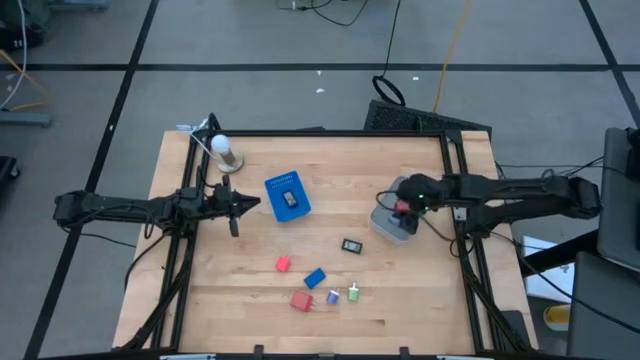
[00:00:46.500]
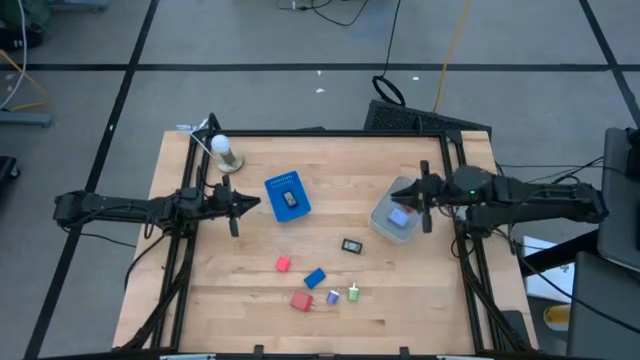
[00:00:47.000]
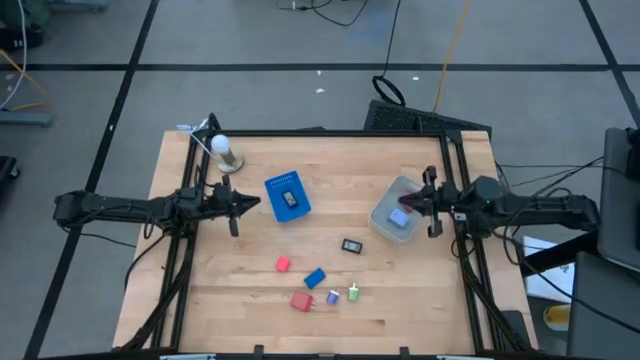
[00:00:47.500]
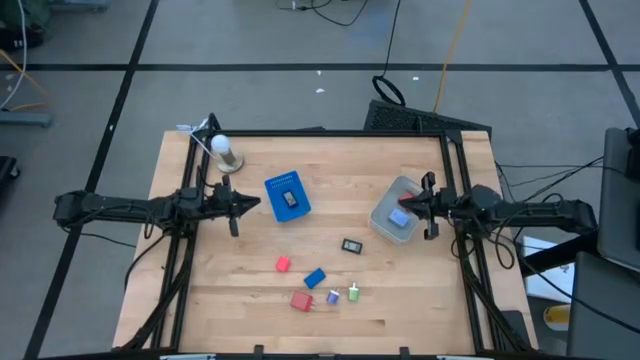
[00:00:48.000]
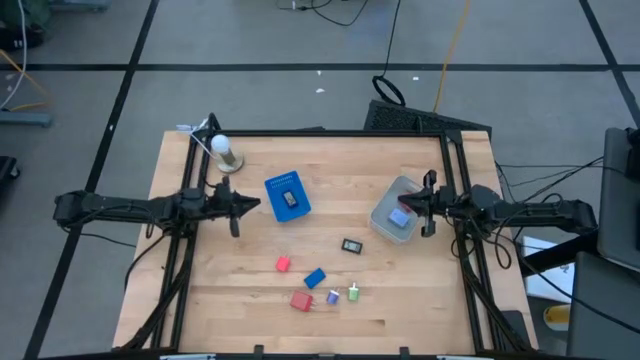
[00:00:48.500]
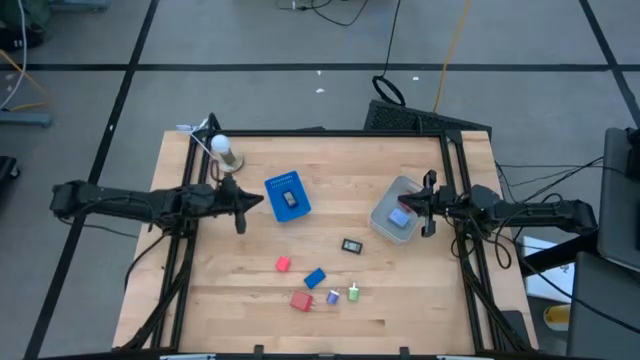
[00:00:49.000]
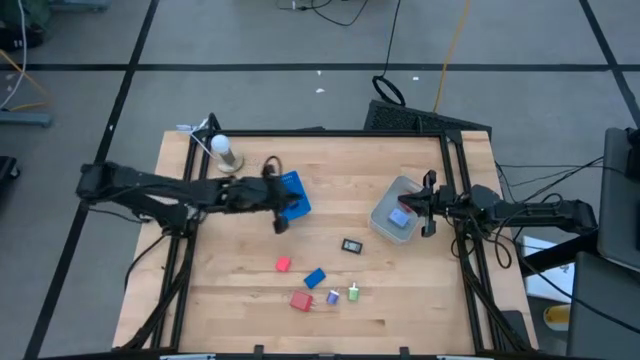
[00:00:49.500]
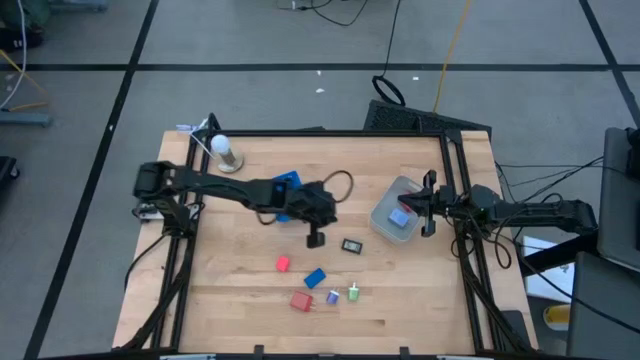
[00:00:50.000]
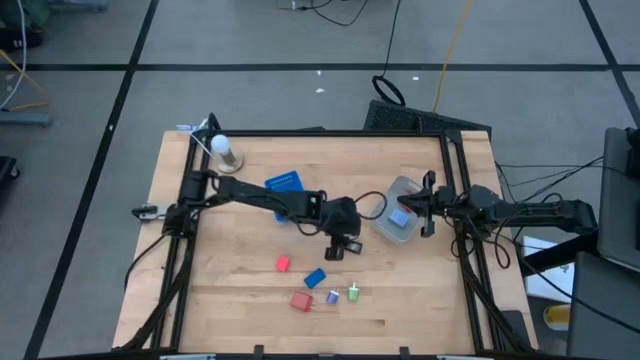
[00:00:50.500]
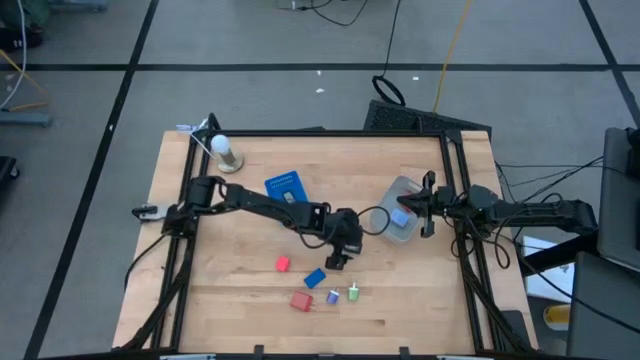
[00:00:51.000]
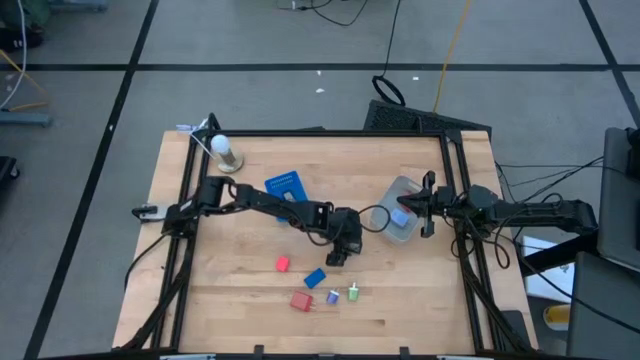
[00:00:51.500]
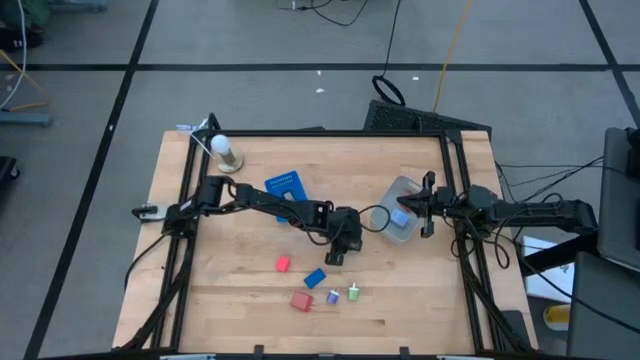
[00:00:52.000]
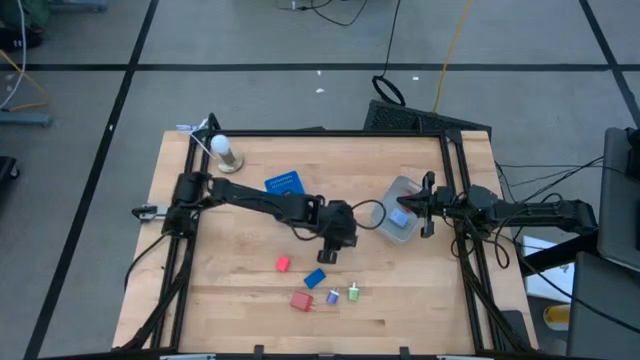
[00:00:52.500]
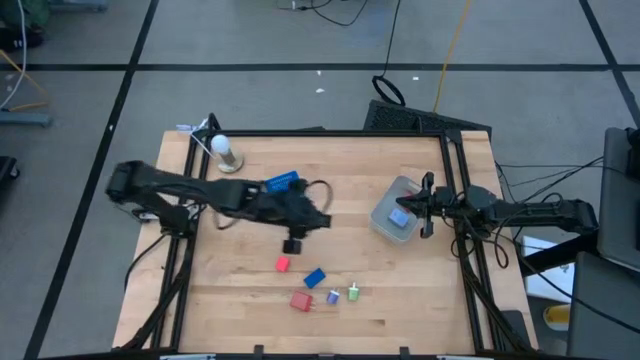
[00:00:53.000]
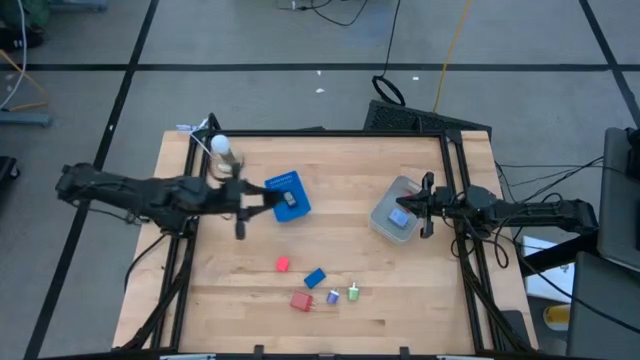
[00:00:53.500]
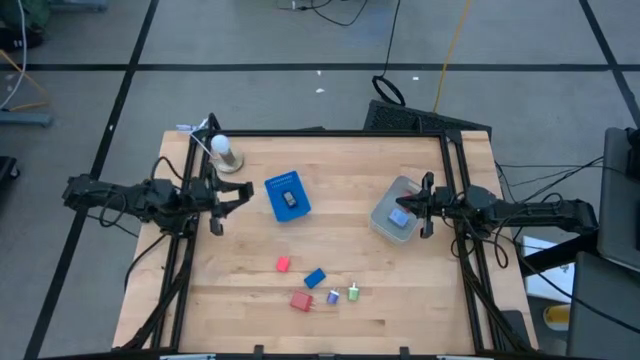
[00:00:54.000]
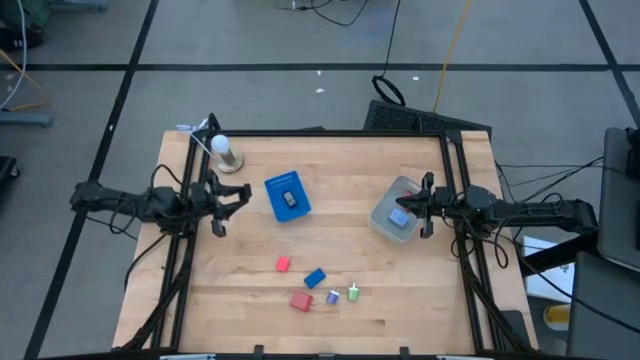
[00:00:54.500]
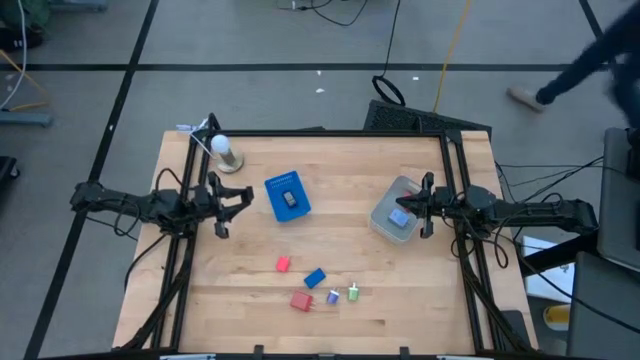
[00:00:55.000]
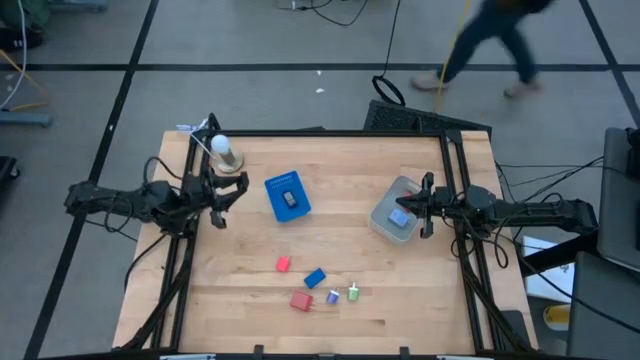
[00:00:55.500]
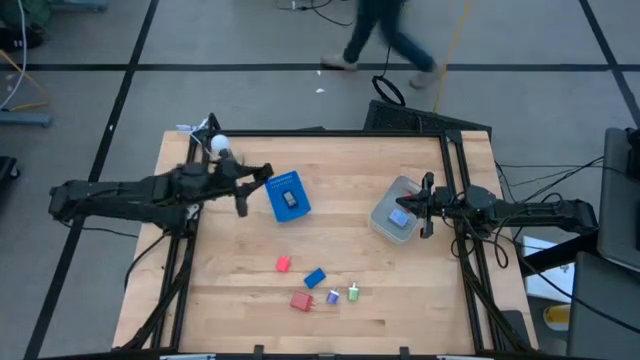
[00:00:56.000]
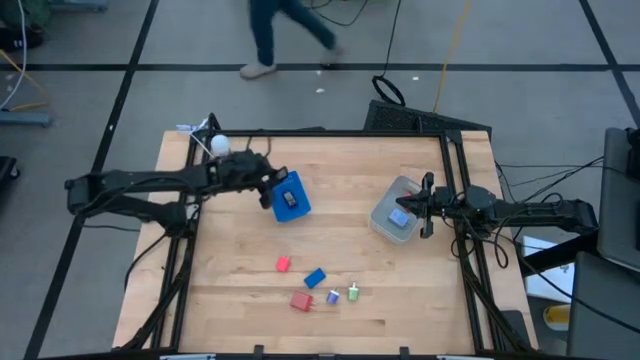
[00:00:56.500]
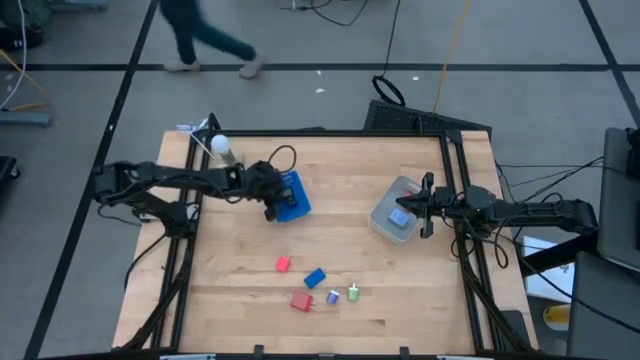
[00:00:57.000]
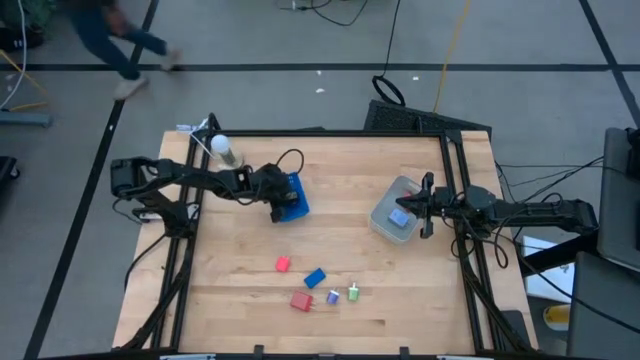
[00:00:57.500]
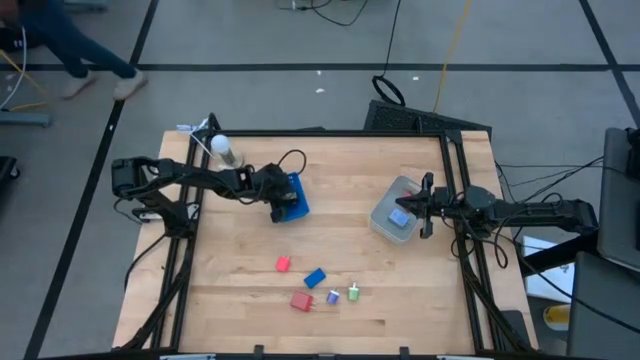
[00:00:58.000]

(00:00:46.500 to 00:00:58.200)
Task: Pick & Place Office items
Put the black digital clock into the blue bin

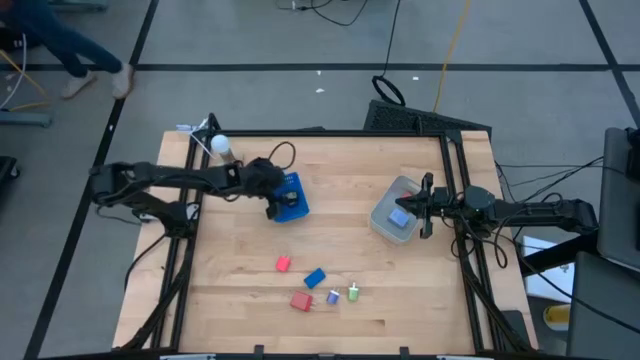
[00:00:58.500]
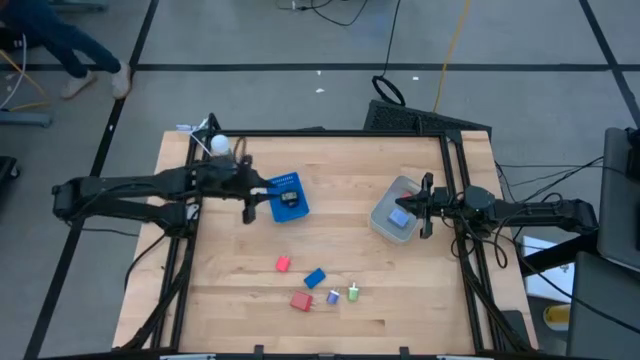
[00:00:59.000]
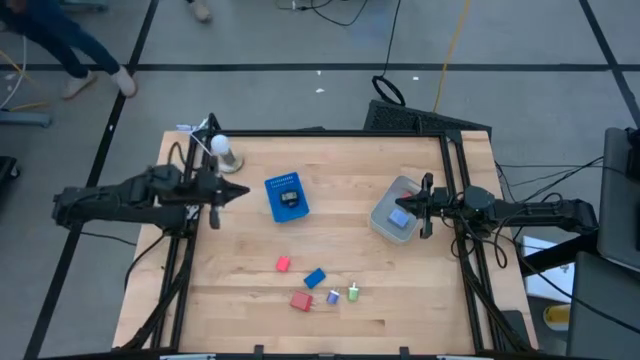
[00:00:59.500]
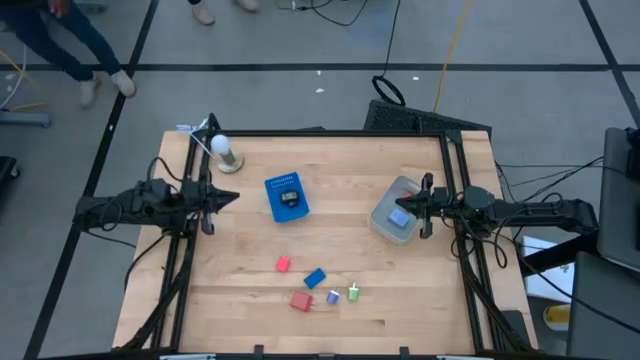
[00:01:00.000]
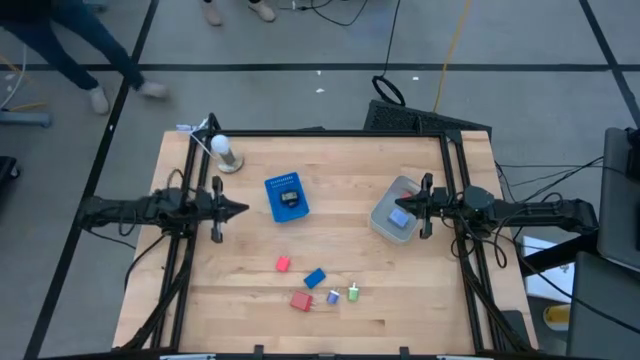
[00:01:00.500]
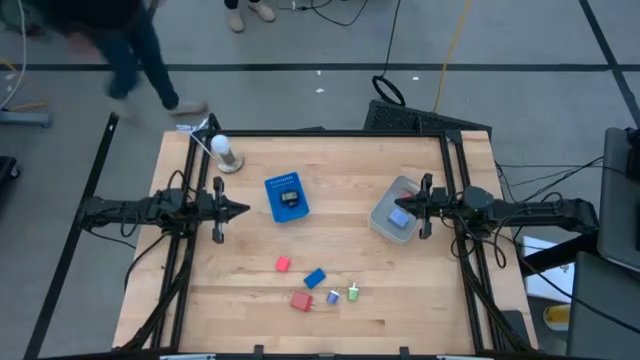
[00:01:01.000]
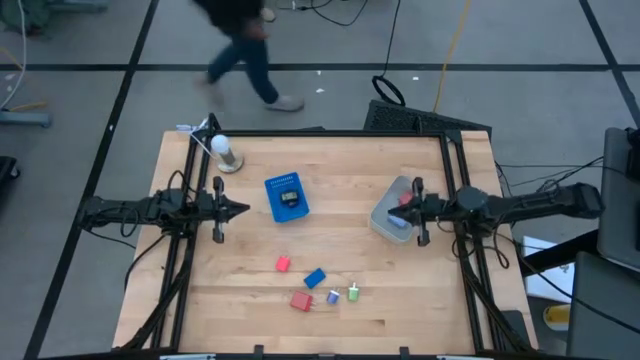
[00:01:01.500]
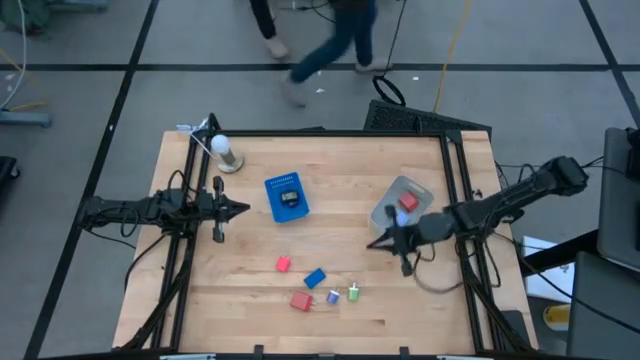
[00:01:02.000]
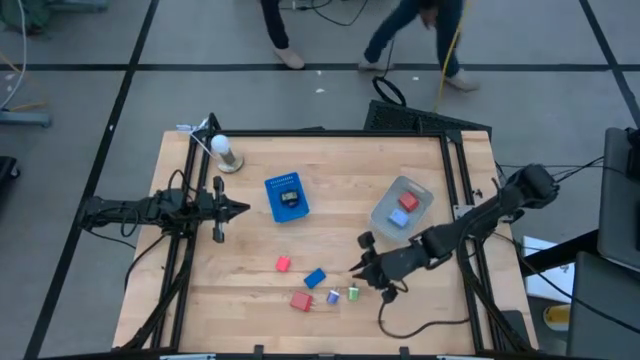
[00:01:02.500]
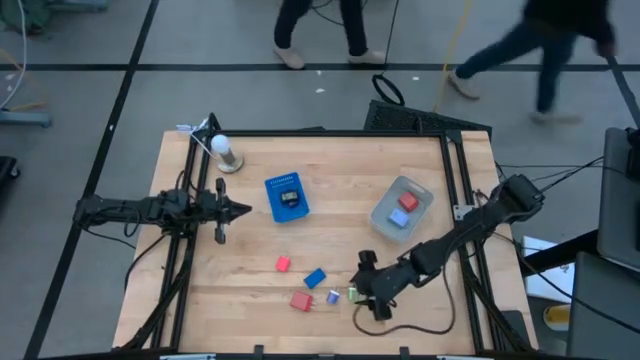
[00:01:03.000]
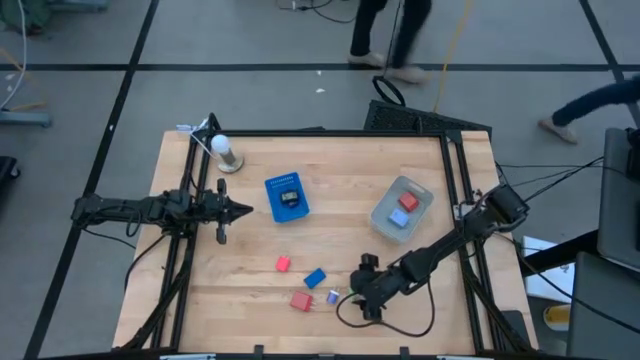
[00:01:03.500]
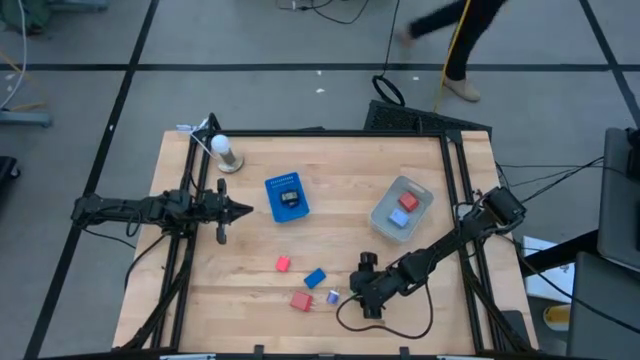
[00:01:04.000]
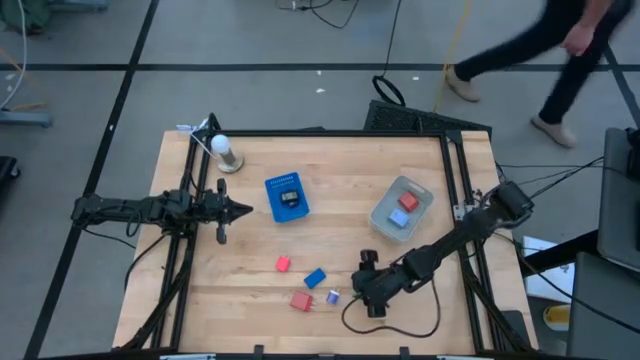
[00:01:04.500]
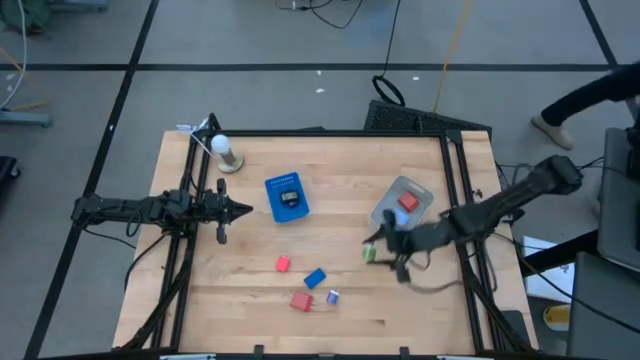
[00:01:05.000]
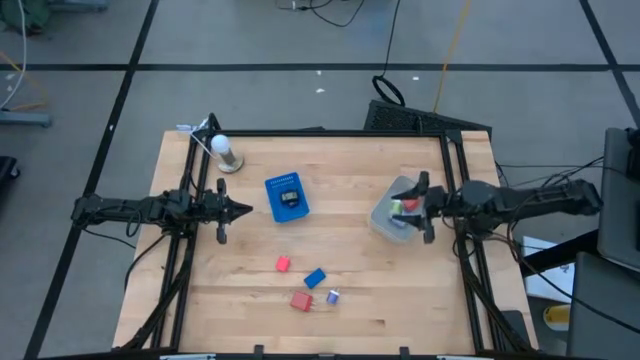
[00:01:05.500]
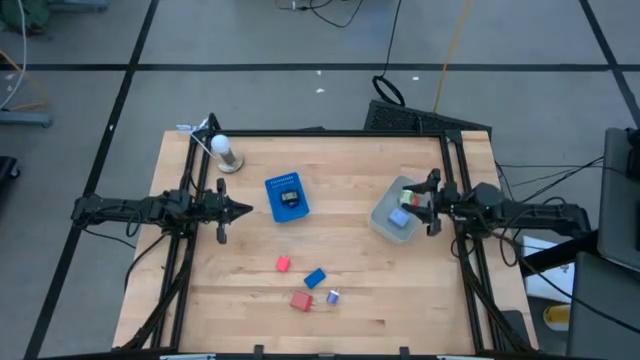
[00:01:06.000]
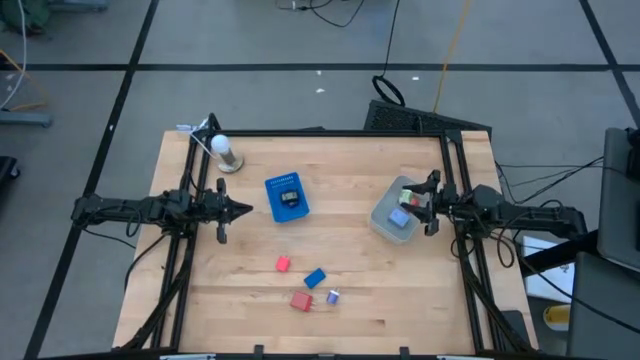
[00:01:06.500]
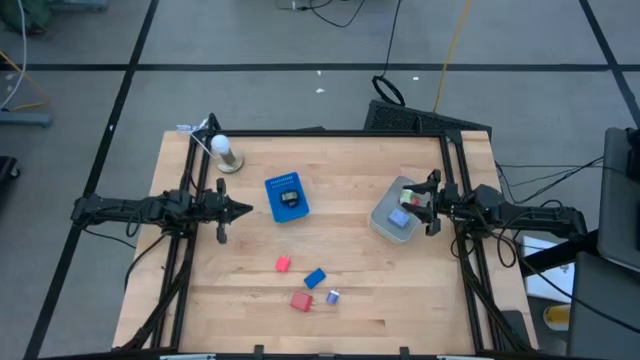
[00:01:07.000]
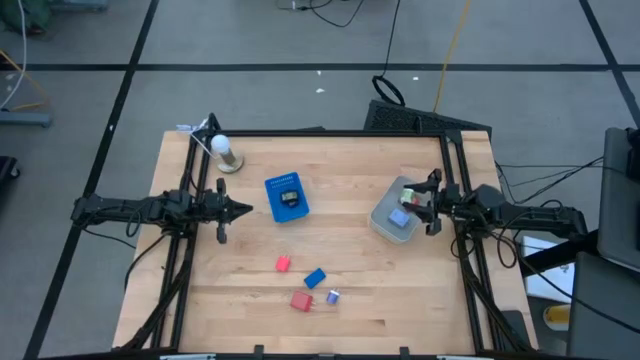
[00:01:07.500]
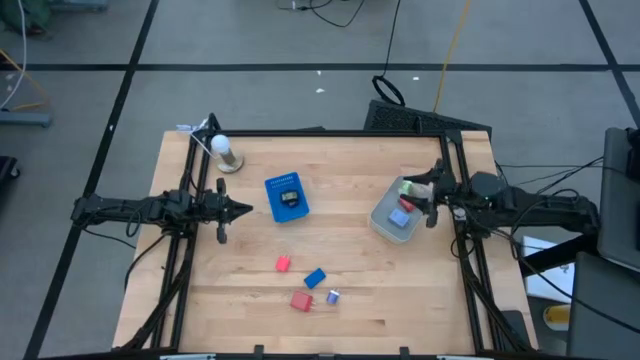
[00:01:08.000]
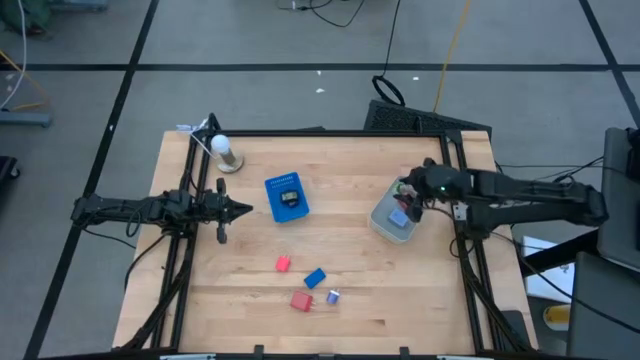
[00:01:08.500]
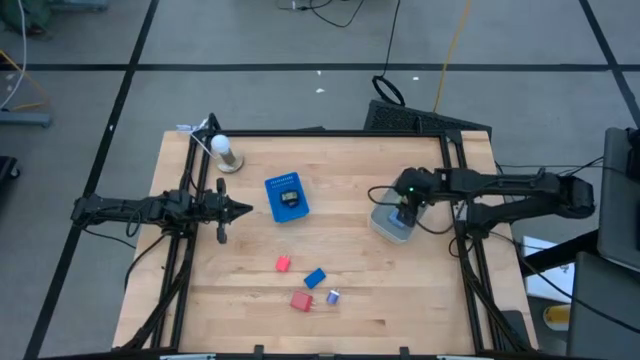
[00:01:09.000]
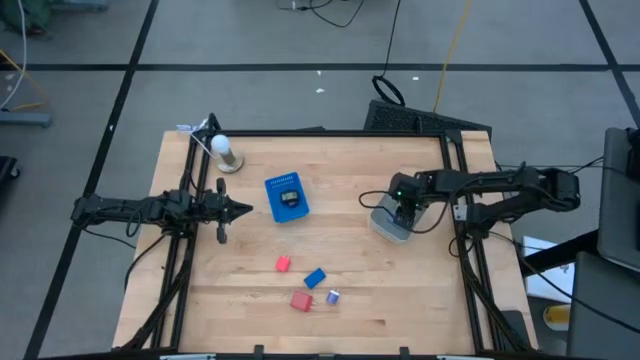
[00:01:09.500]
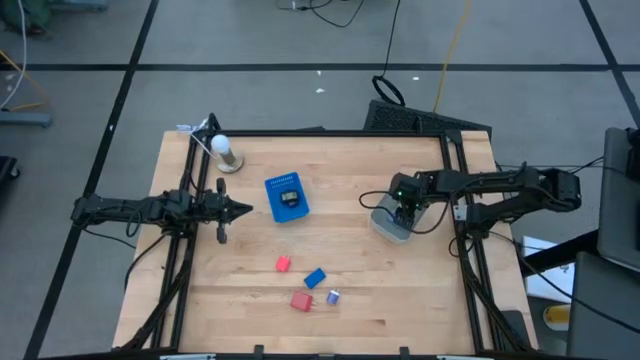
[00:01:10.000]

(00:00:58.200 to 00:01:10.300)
Put the green charger adapter into the gray bin
